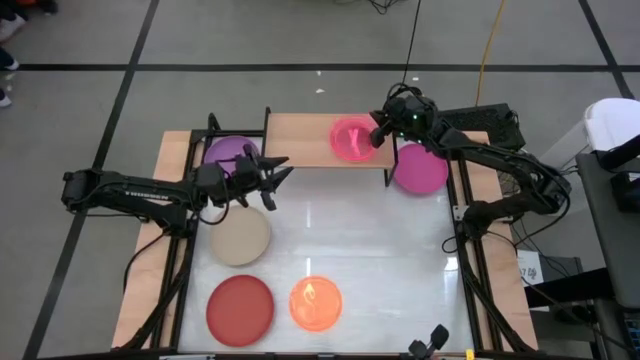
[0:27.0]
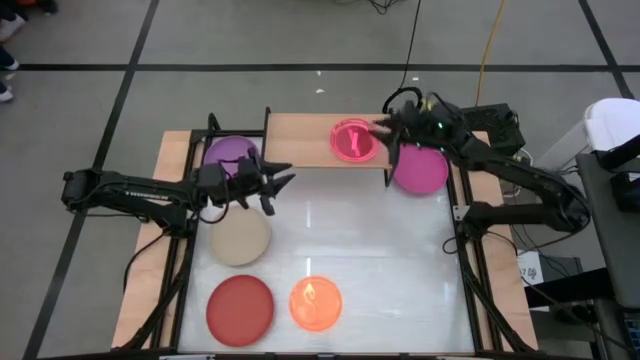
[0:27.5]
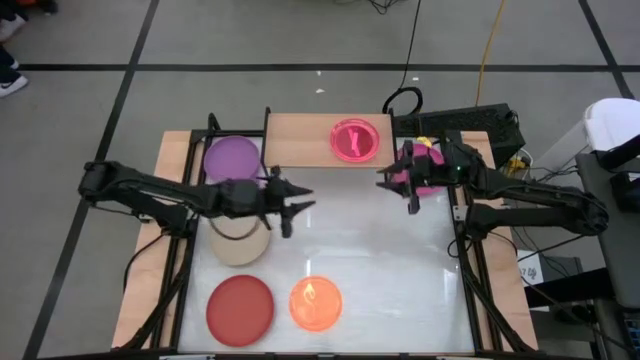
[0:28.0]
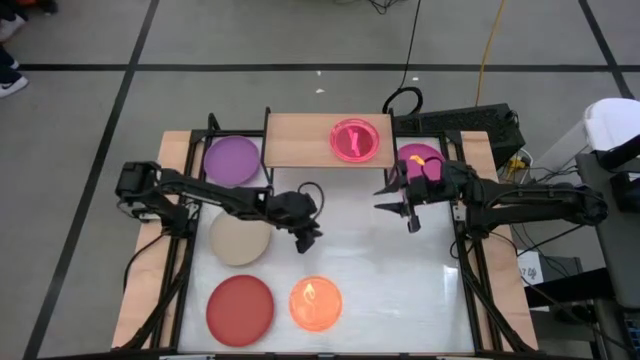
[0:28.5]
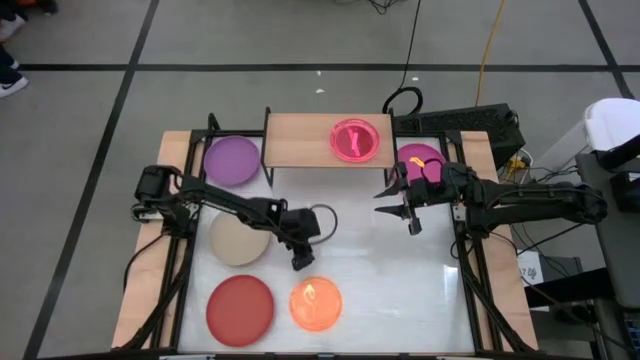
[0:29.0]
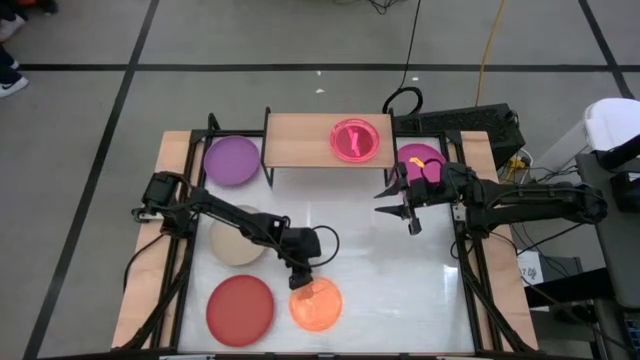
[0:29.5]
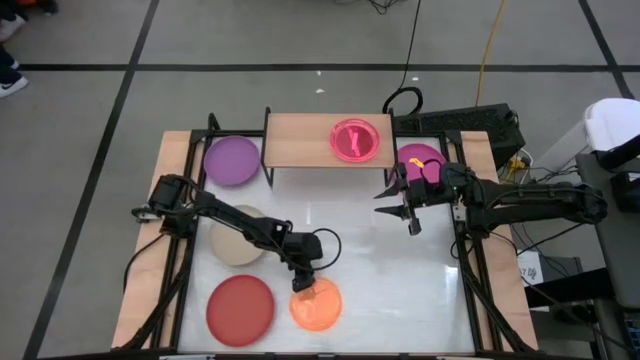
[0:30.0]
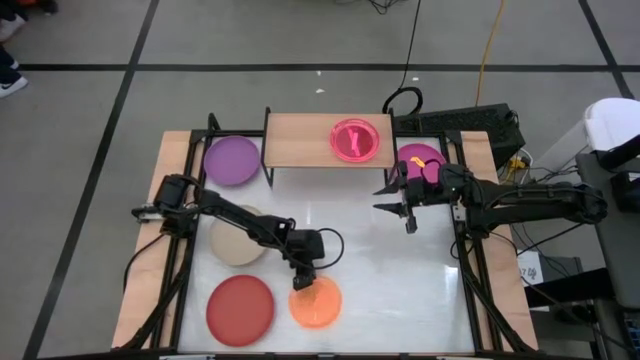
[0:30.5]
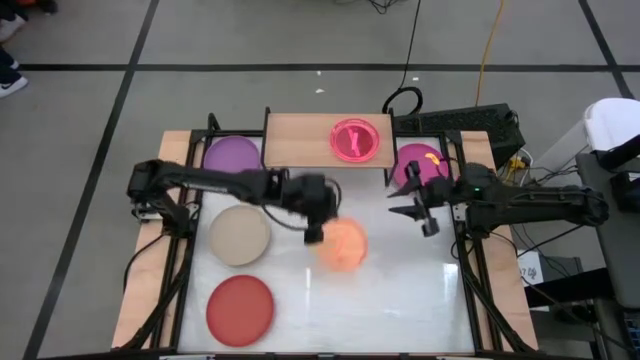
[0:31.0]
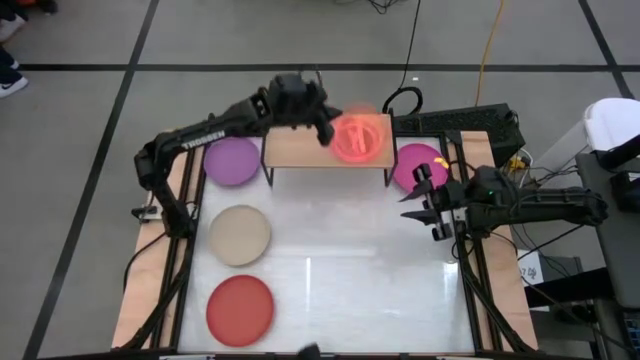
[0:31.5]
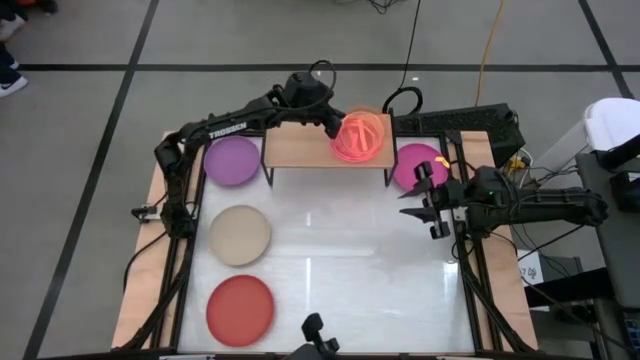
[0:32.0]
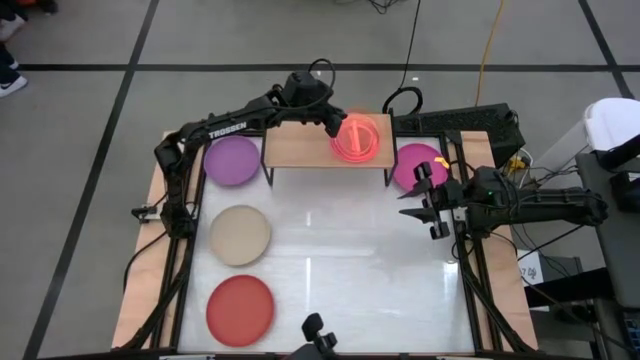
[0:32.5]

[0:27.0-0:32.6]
Task: Place and stack plates onto a shelf
Stack the small orange plate on top of the other small pink plate on the shelf

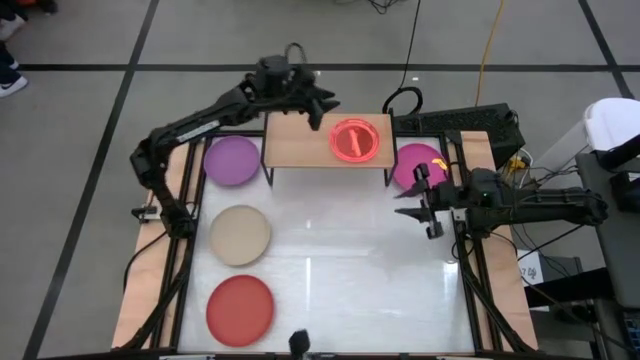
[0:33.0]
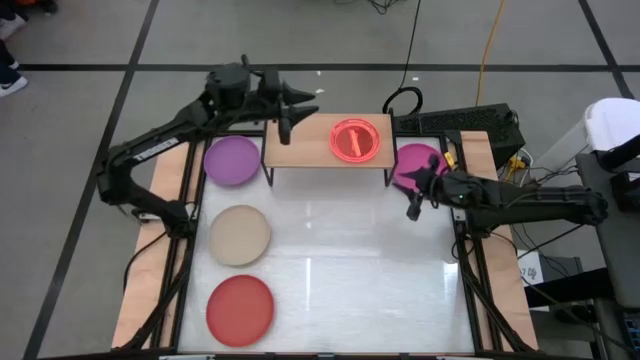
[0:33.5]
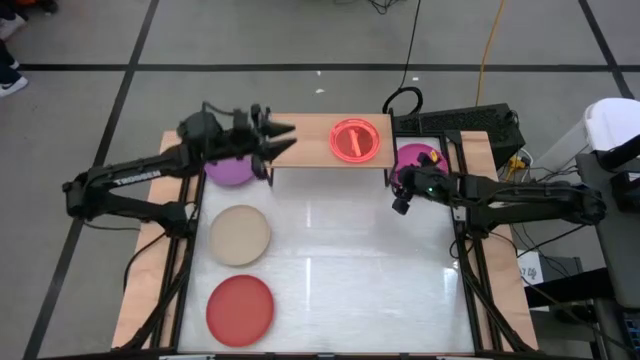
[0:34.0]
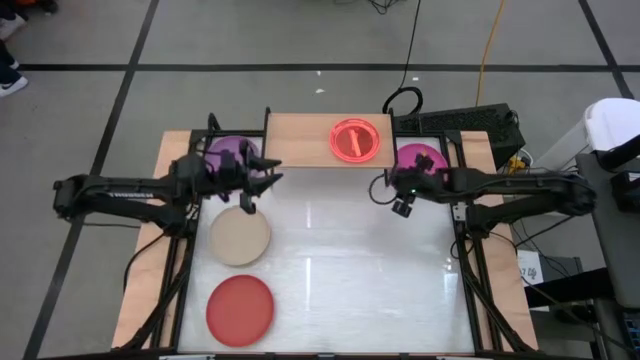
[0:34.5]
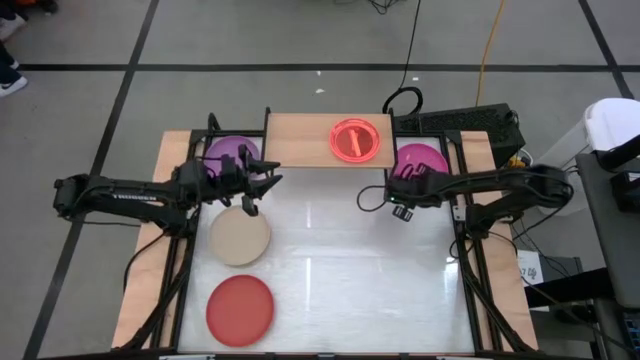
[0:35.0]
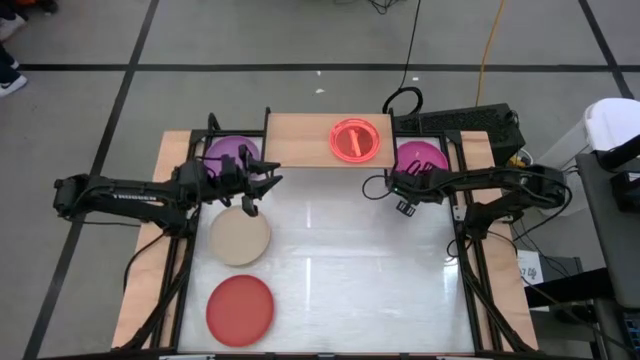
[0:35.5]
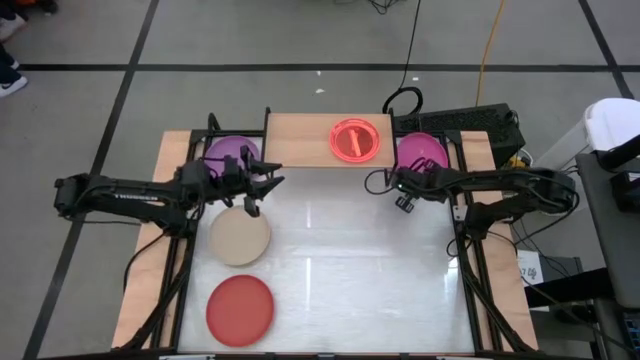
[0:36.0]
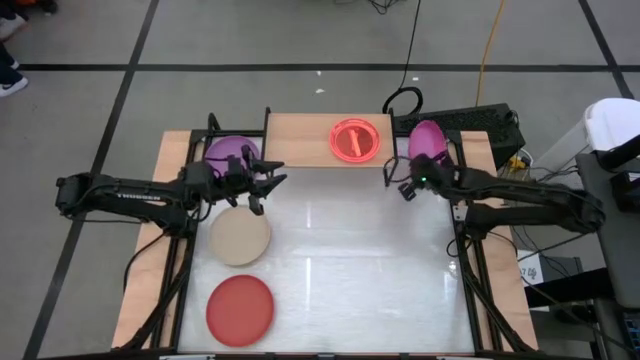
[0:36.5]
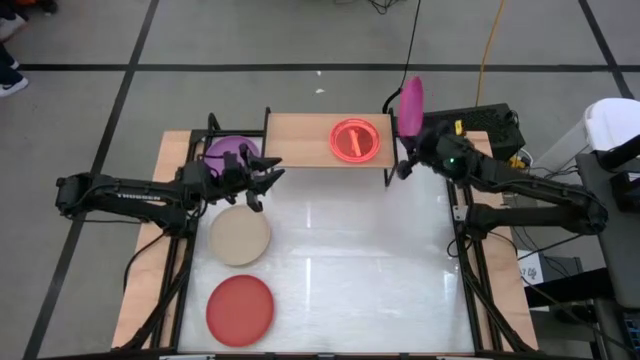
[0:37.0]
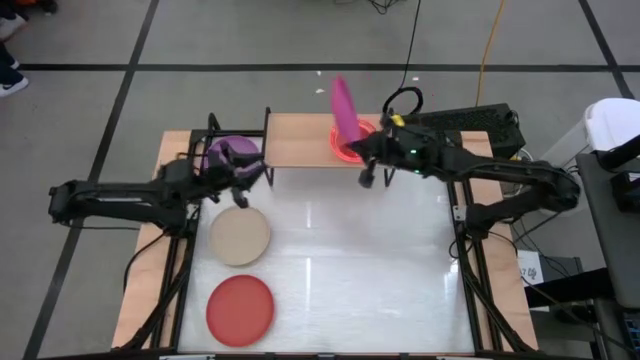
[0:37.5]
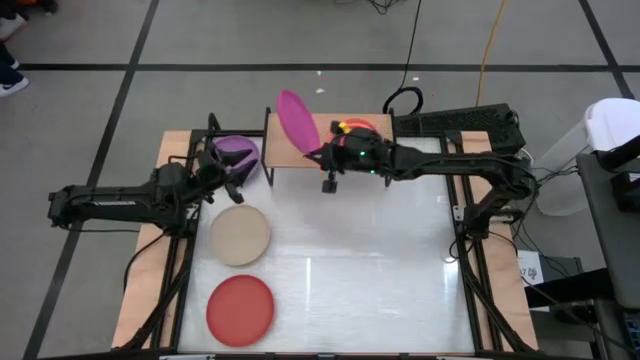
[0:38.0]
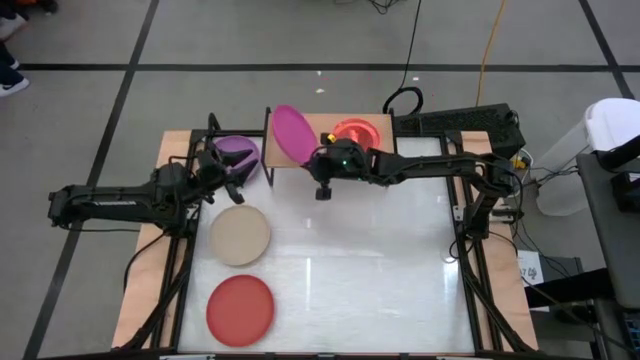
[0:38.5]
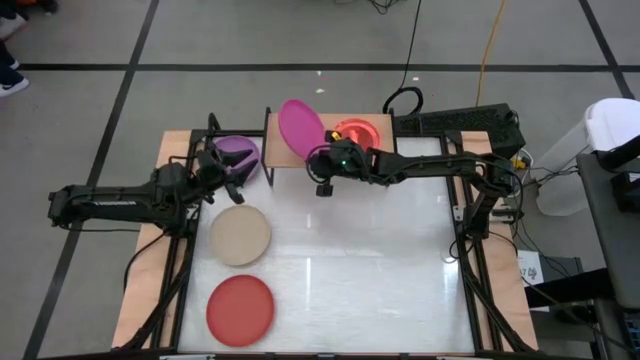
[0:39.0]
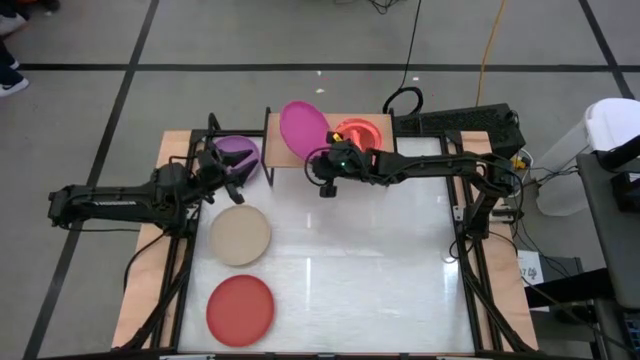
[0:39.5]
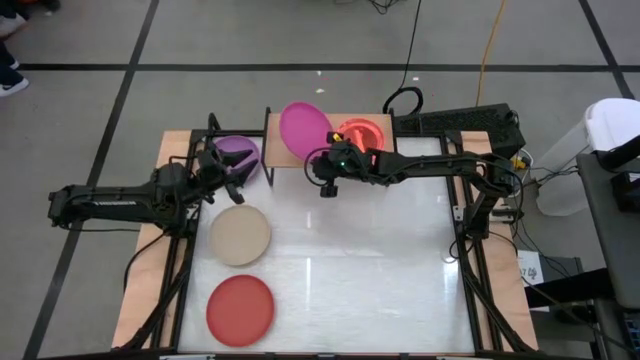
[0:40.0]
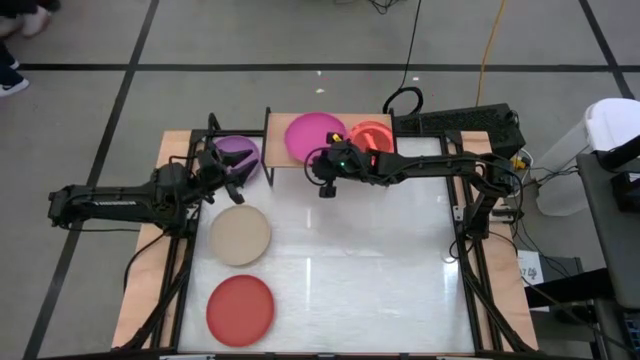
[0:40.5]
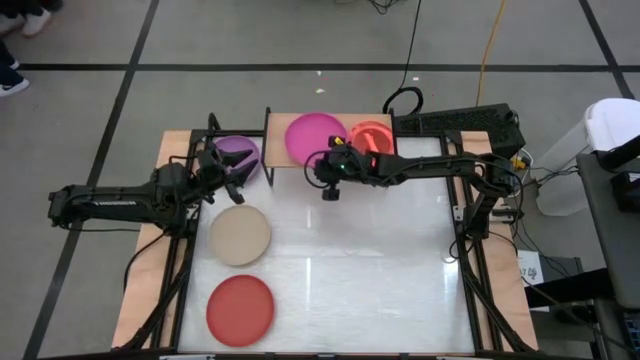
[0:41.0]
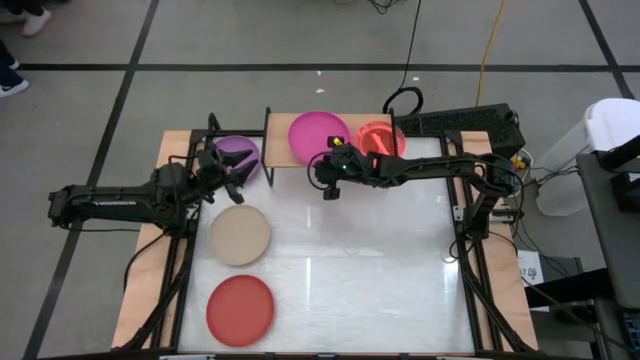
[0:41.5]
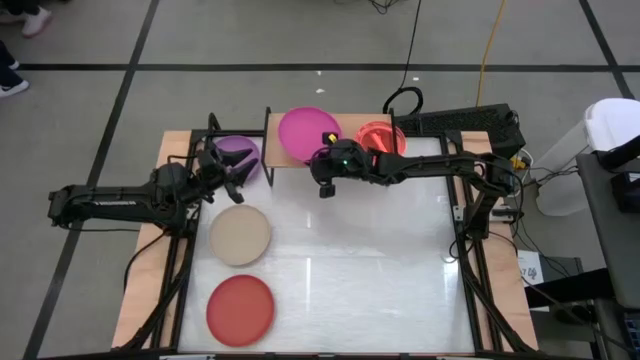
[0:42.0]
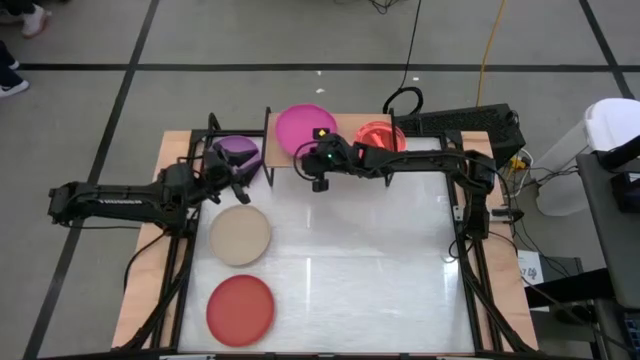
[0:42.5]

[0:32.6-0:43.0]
Put the large pink plate on the shelf

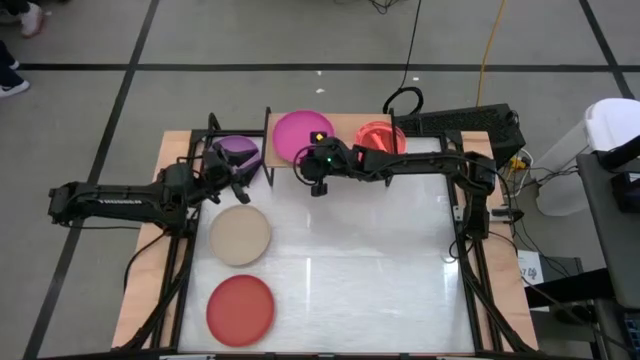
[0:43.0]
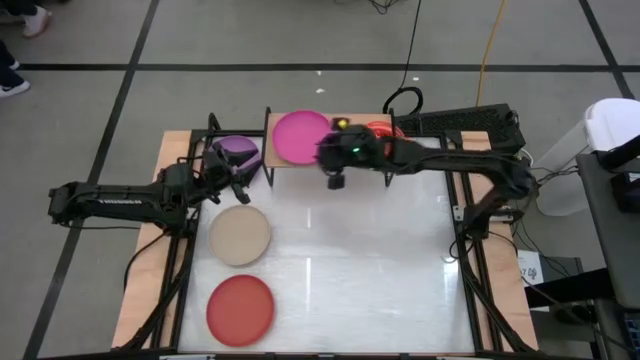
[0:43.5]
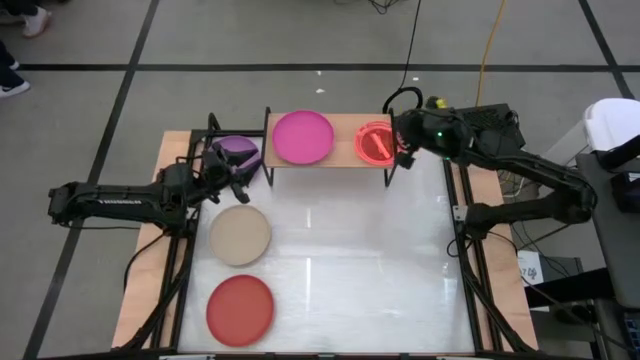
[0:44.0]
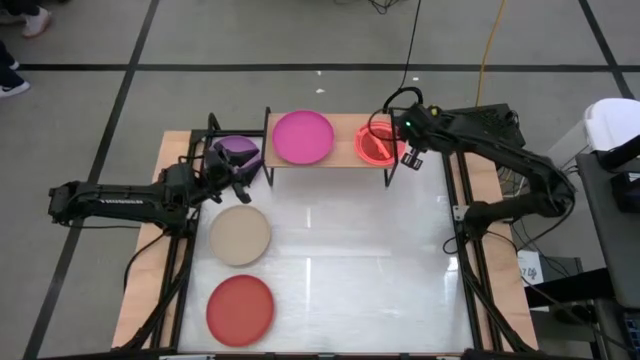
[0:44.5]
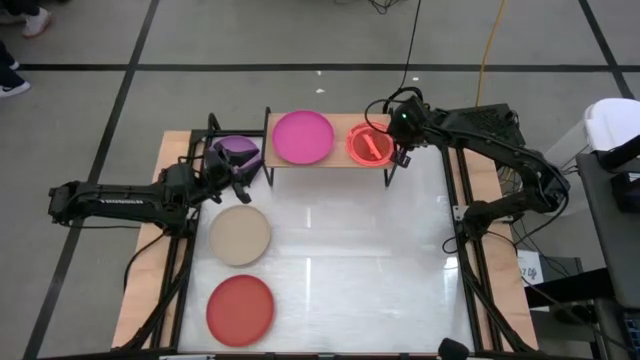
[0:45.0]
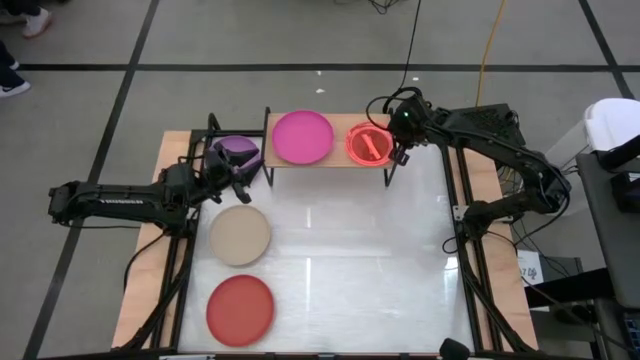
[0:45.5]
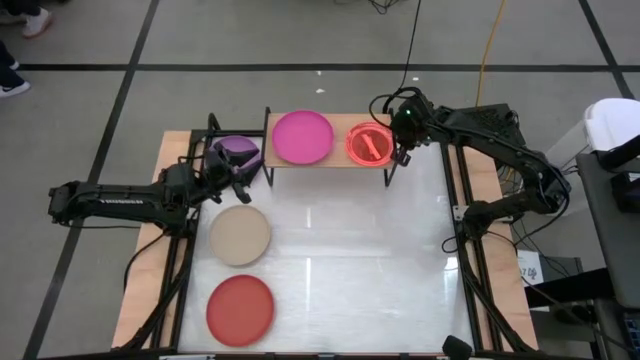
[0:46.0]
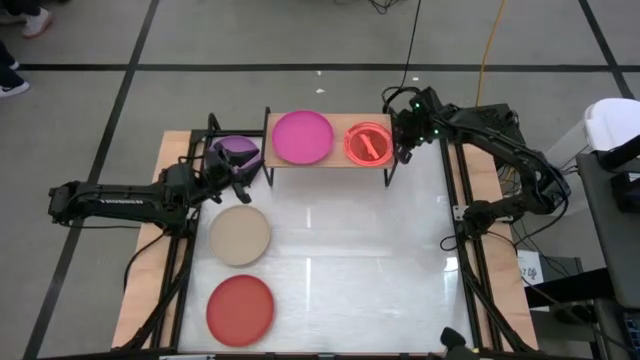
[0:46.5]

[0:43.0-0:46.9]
Adjust the stacked small plates
